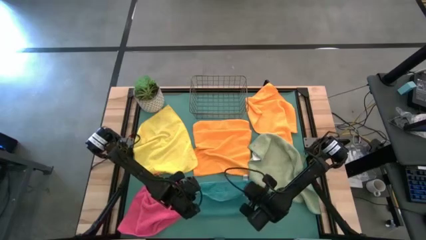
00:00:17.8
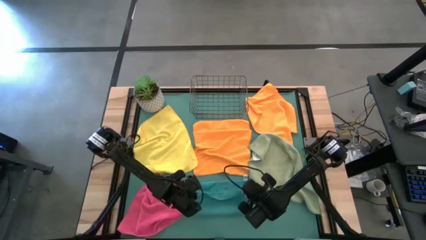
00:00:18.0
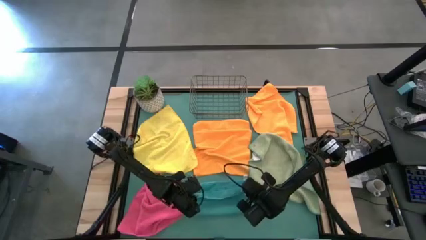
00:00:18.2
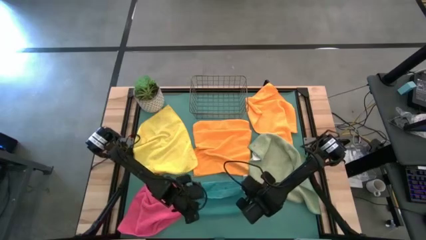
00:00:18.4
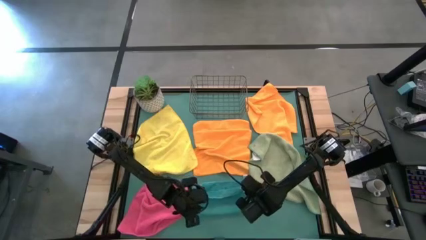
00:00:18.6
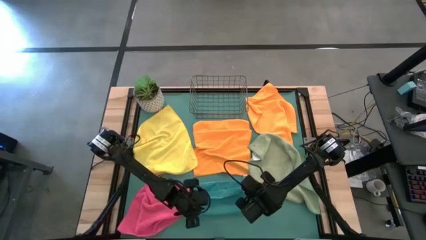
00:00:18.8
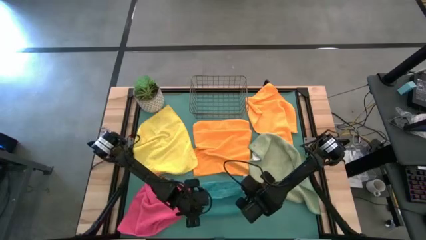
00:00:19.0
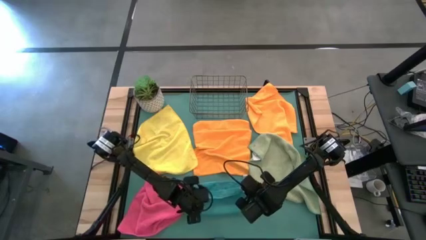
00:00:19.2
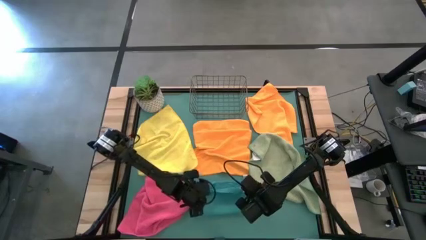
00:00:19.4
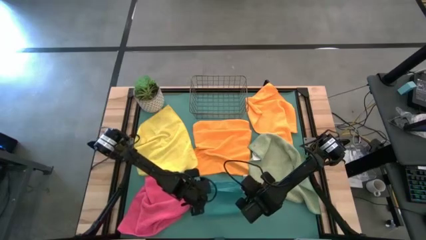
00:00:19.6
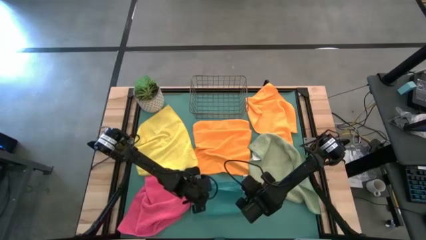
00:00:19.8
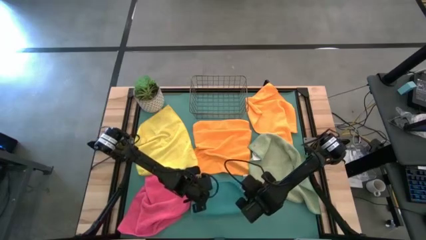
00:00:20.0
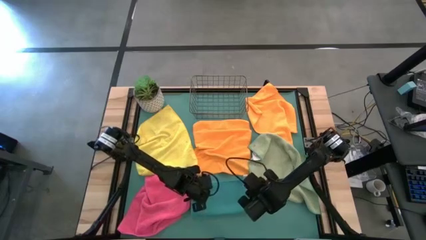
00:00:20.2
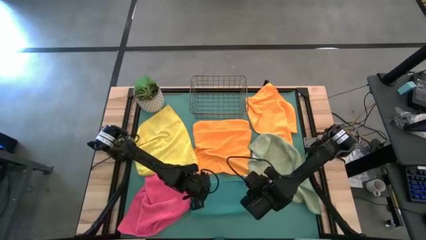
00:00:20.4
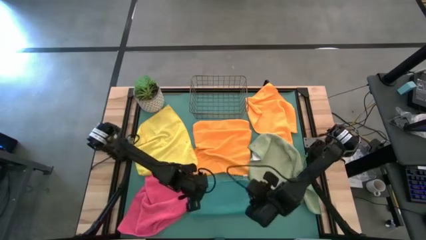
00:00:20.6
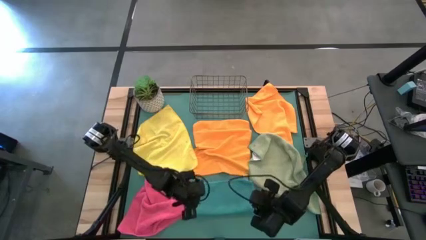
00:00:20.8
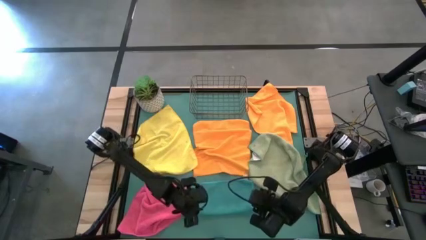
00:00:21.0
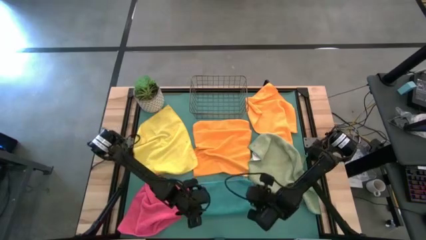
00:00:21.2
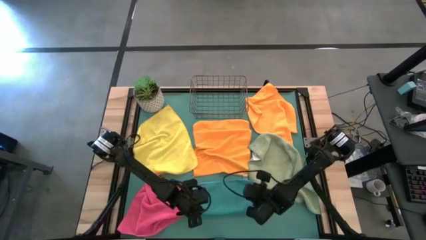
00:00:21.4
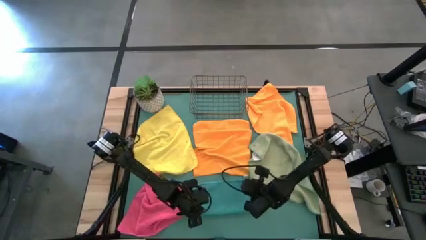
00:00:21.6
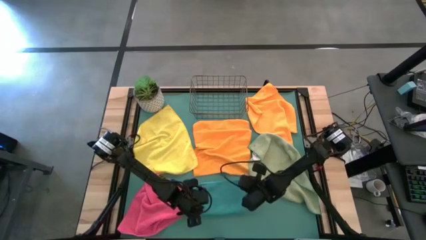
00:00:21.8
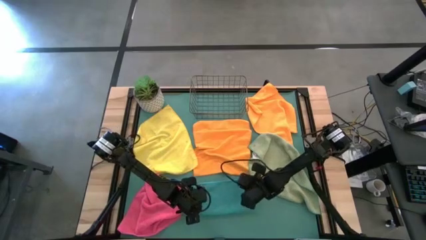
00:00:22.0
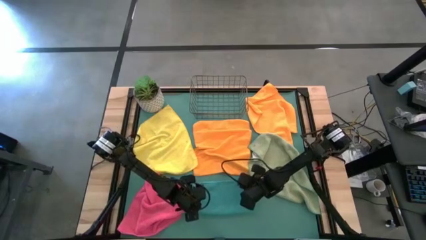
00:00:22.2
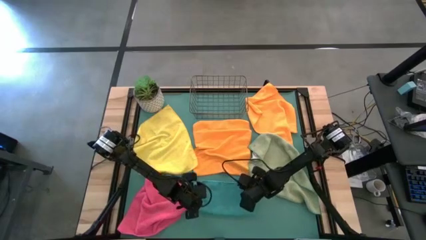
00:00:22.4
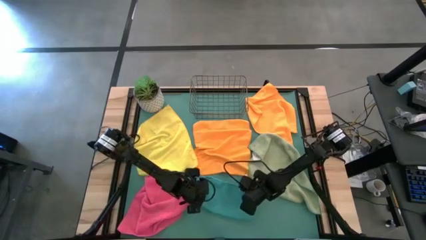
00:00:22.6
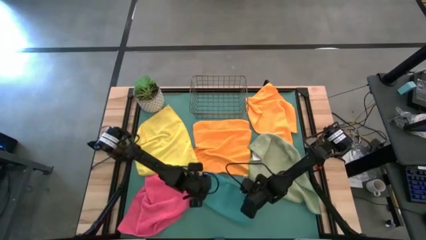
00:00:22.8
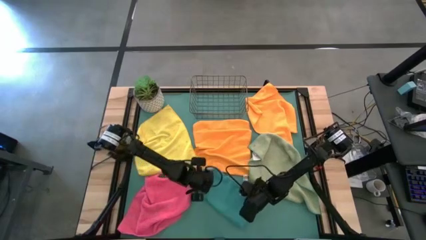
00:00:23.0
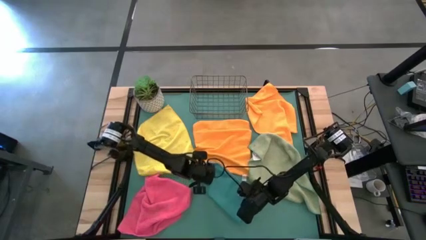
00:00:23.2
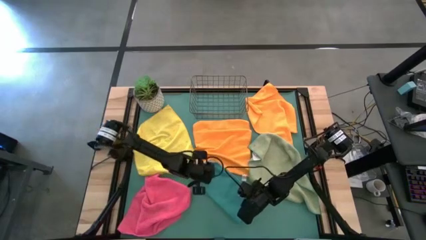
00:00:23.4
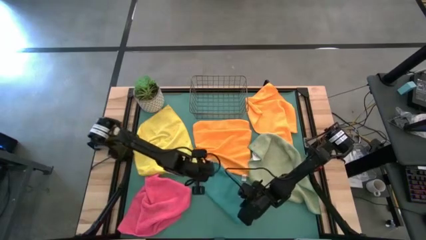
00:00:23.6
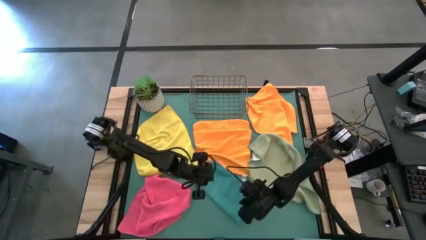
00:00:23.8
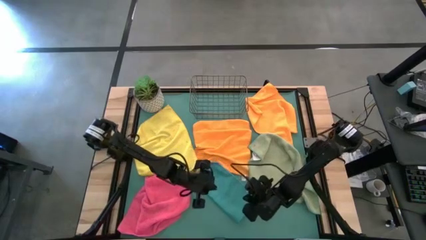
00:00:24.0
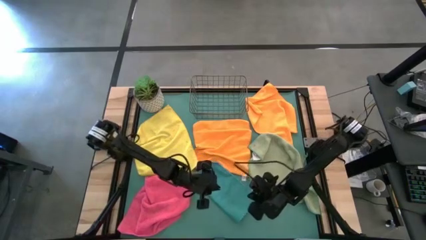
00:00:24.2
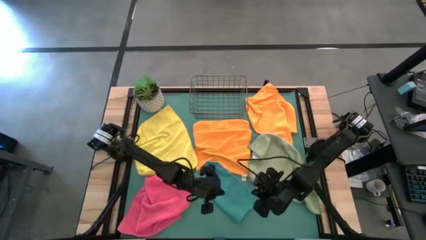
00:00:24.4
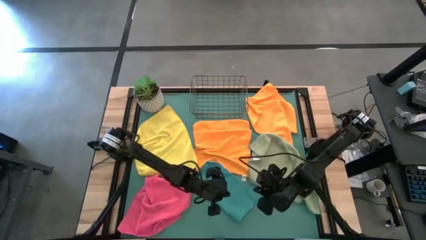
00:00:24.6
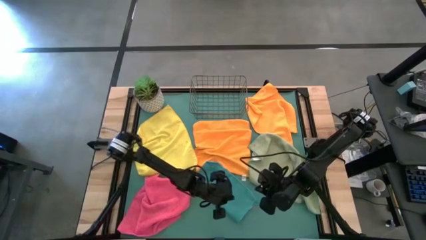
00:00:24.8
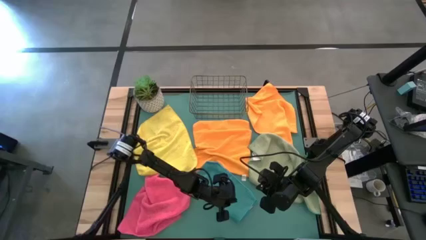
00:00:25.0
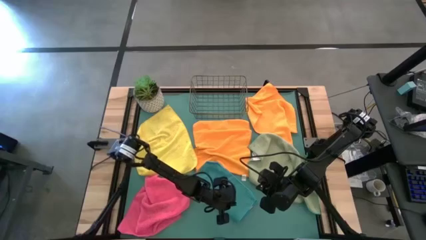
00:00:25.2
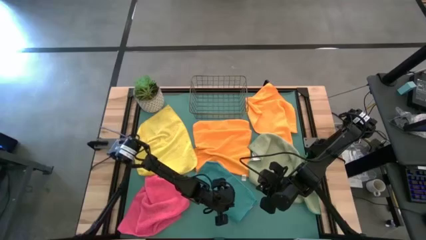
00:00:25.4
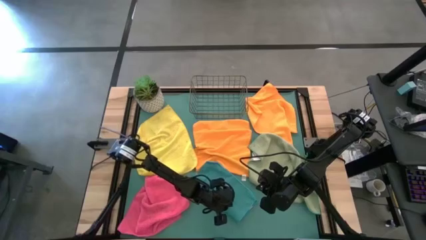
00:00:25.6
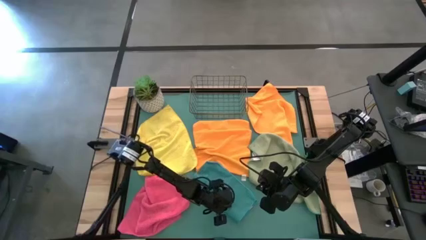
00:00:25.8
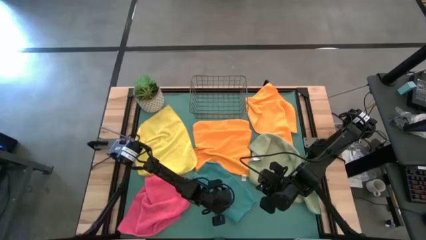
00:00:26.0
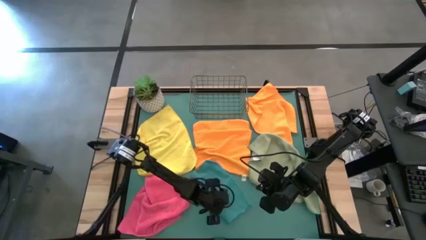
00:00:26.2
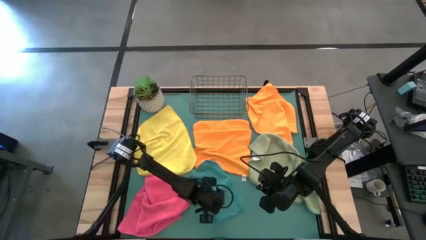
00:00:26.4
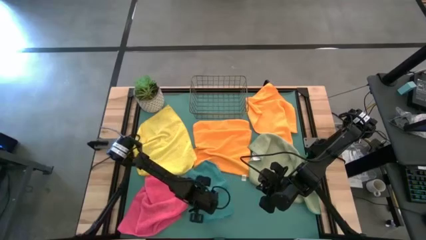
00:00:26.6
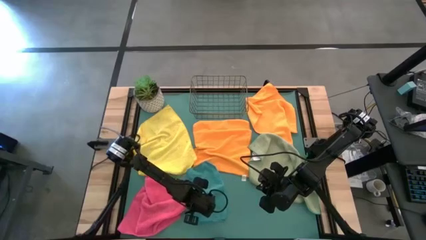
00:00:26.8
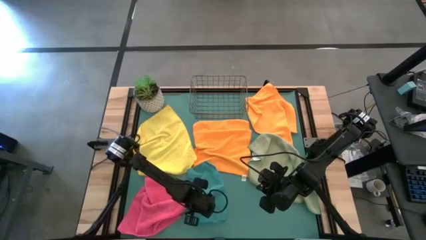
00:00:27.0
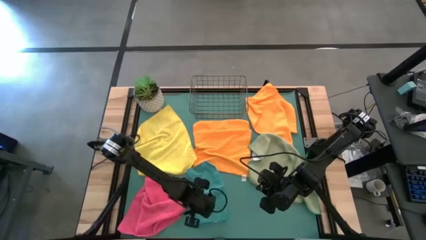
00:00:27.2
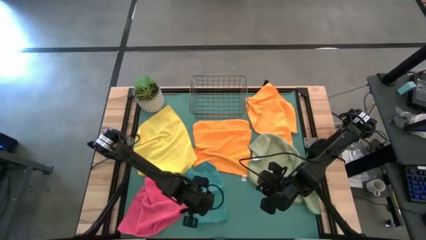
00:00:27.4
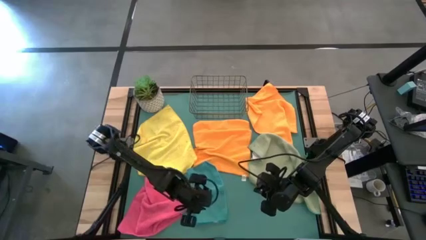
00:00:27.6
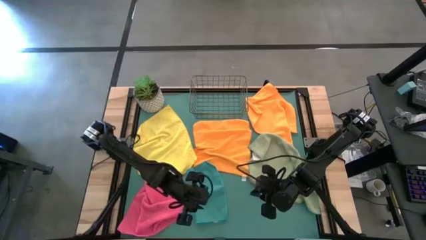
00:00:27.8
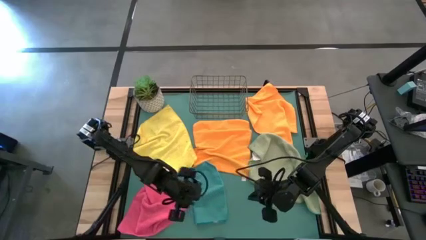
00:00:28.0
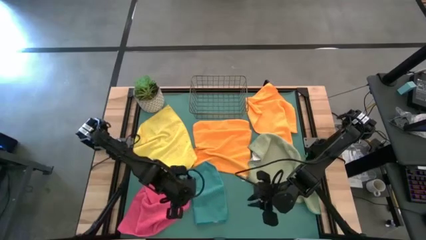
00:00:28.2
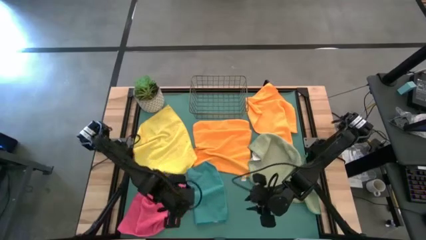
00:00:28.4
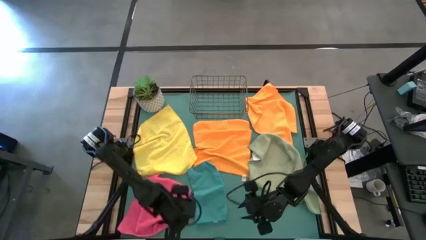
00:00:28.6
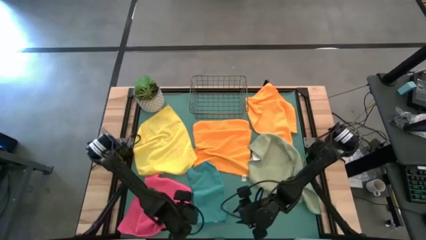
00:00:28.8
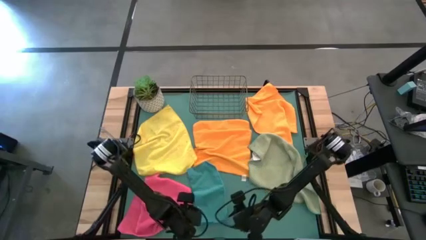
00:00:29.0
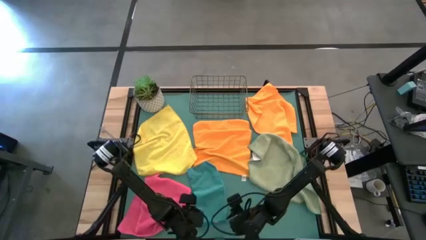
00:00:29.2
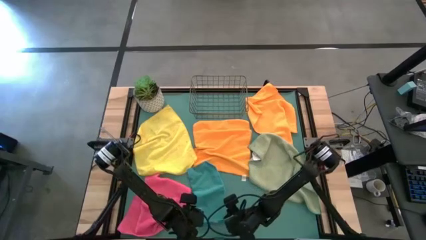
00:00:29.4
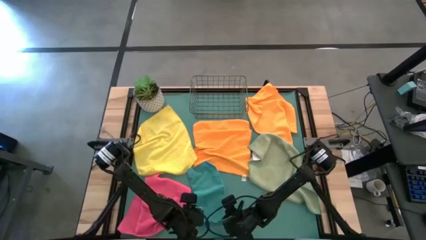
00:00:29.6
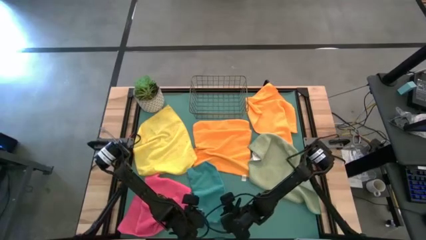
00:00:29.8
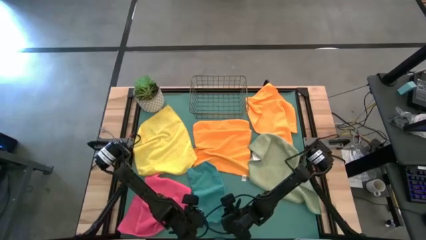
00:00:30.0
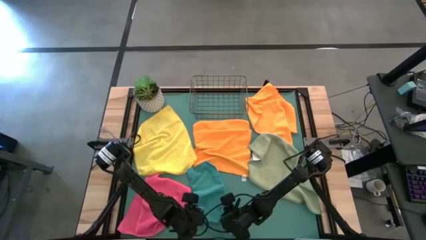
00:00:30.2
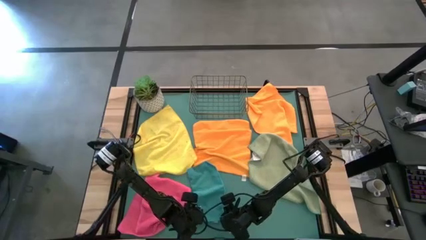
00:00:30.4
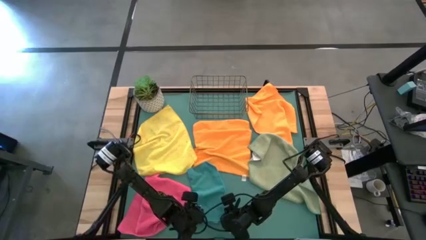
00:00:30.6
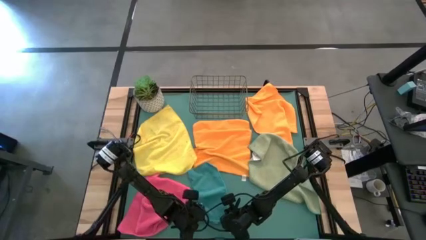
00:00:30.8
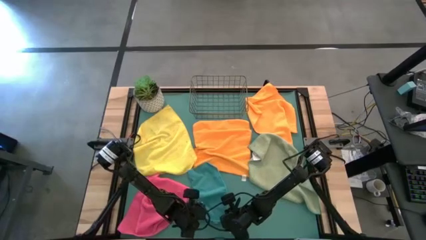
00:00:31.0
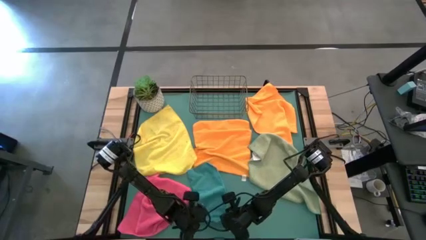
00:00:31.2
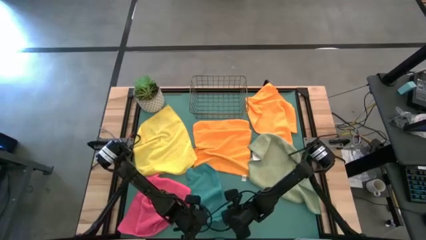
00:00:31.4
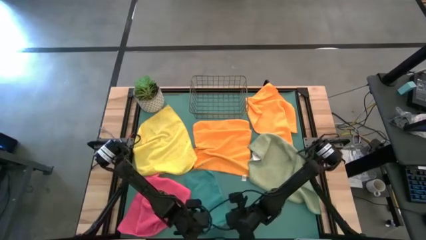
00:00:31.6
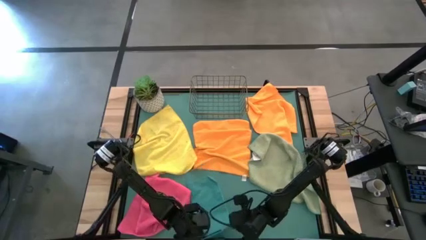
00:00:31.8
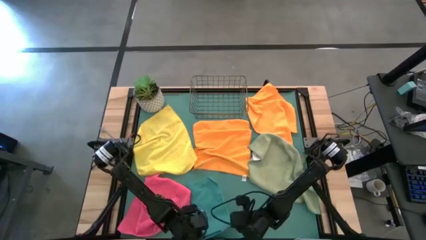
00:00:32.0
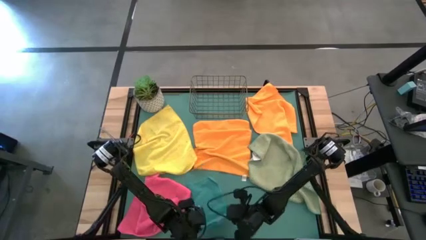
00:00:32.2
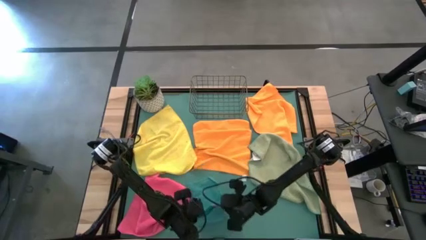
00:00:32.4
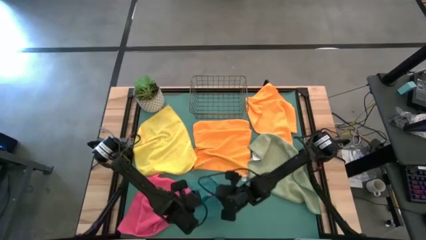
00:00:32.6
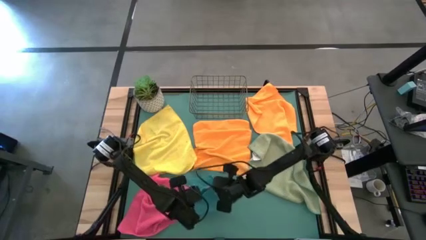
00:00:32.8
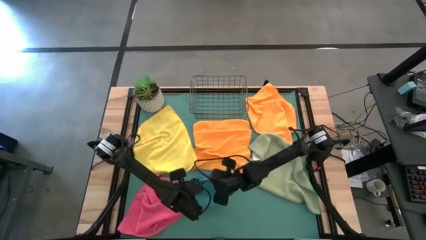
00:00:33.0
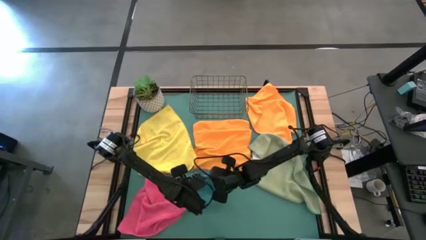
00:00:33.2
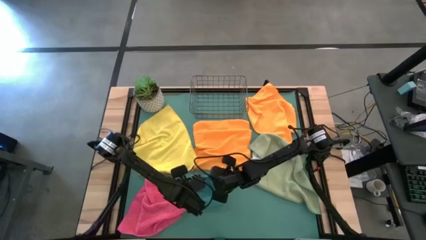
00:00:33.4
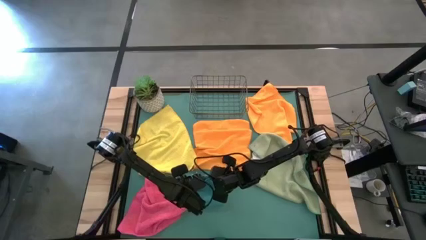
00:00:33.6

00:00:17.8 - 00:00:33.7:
Task: Fold microfiber towels
Fold the blue microfiber cloth
